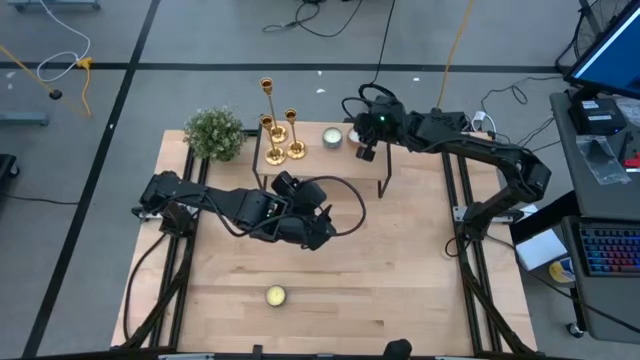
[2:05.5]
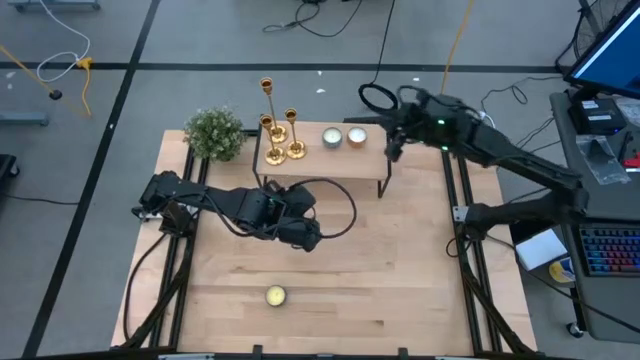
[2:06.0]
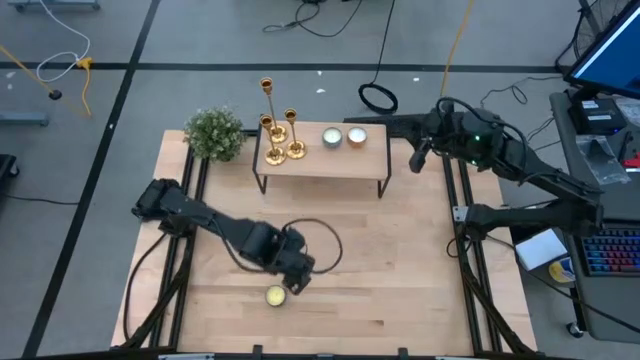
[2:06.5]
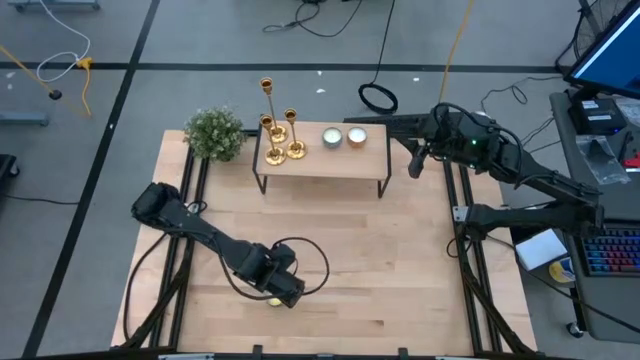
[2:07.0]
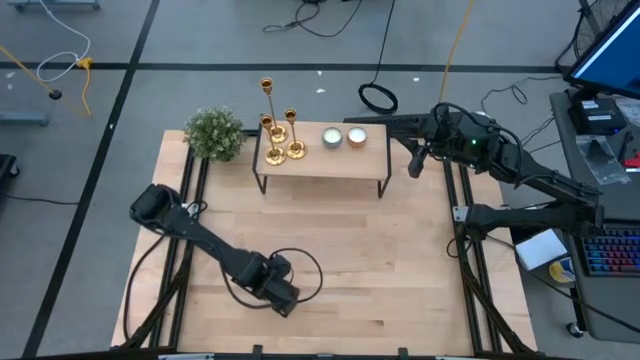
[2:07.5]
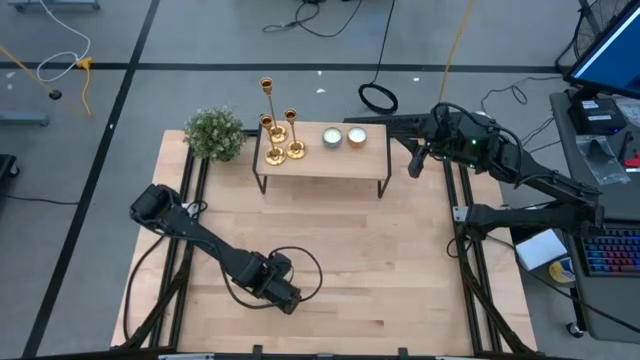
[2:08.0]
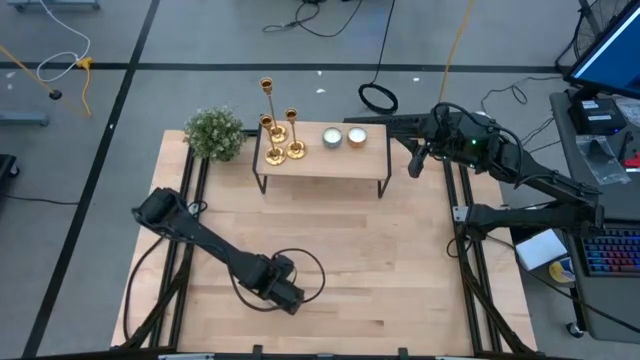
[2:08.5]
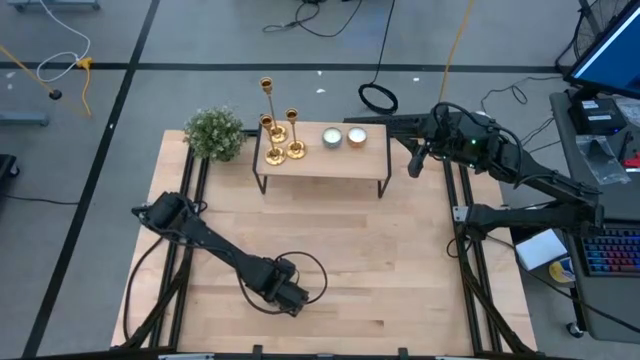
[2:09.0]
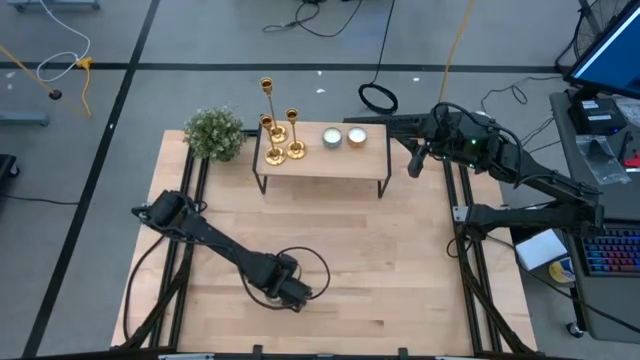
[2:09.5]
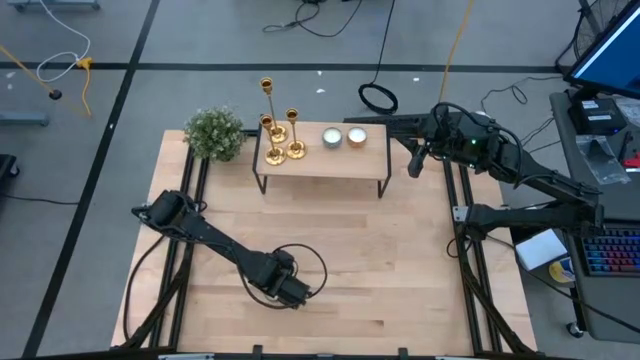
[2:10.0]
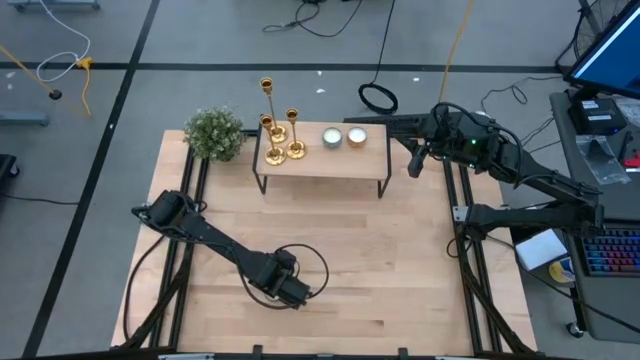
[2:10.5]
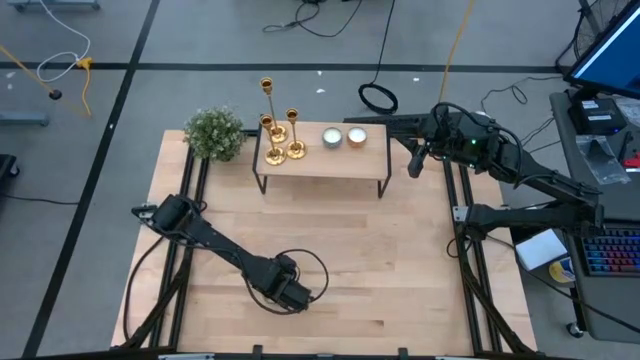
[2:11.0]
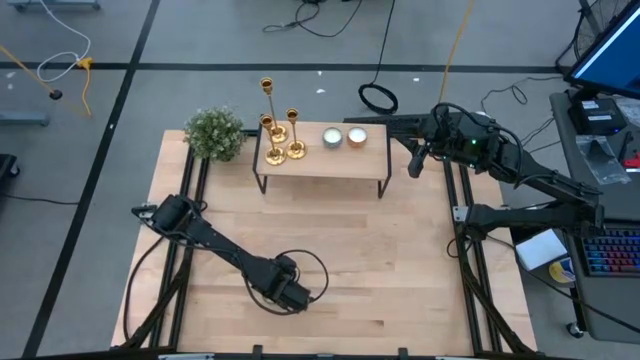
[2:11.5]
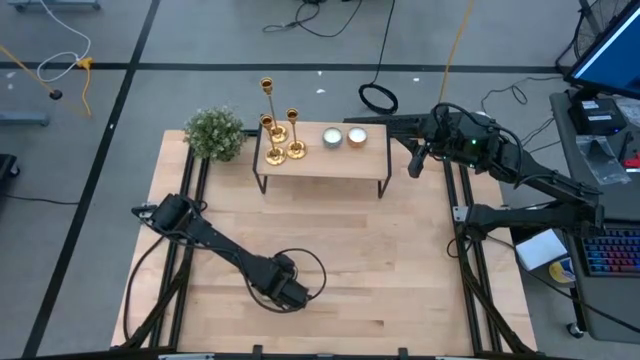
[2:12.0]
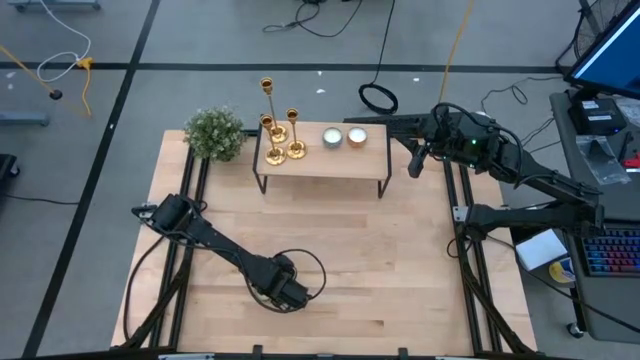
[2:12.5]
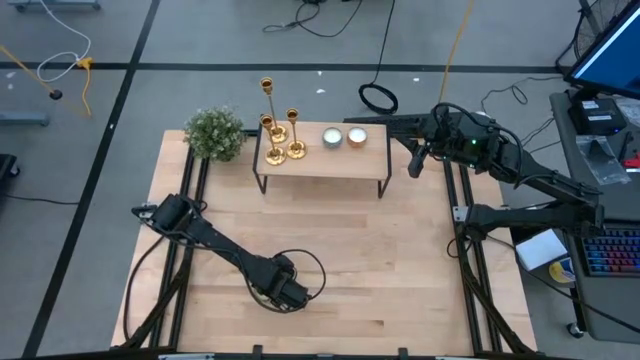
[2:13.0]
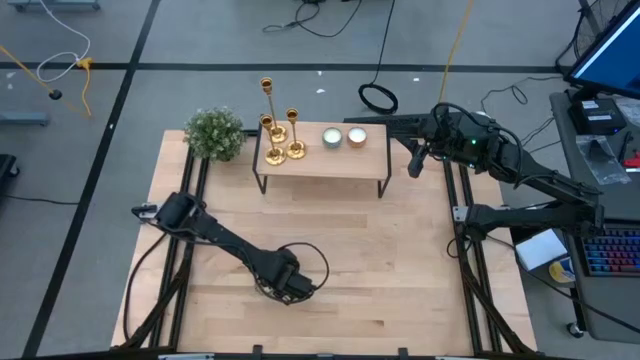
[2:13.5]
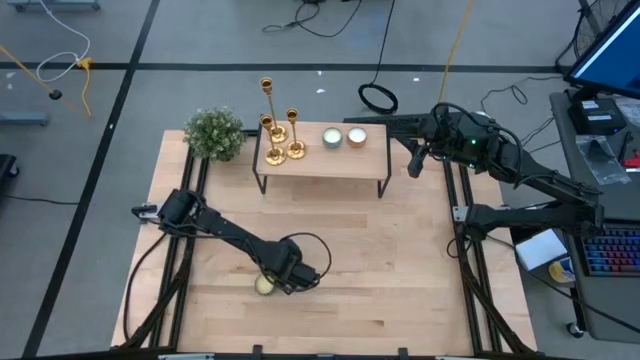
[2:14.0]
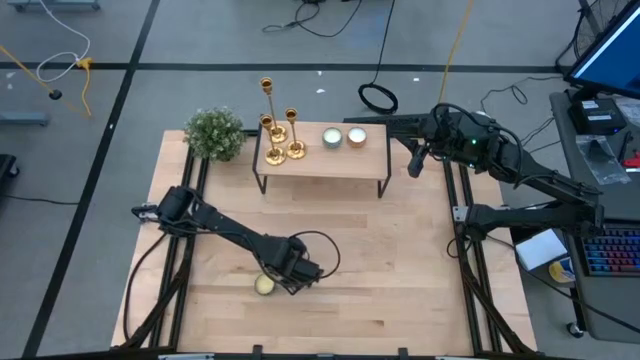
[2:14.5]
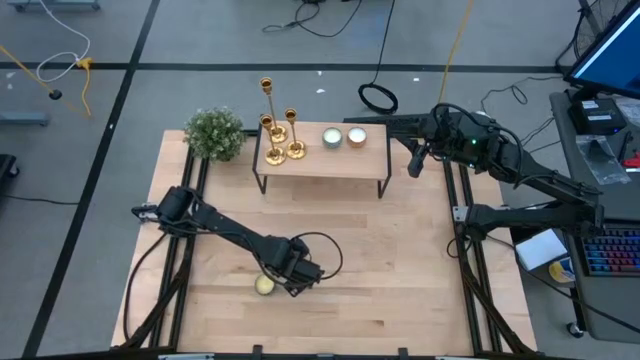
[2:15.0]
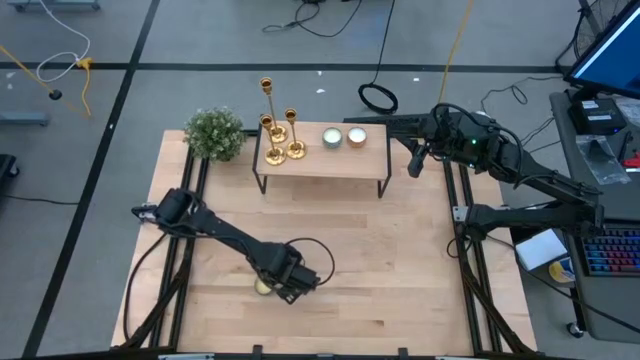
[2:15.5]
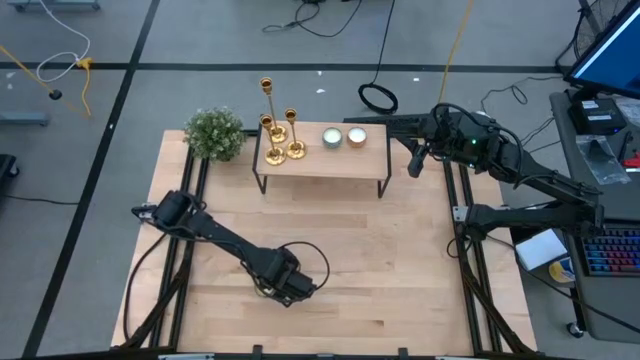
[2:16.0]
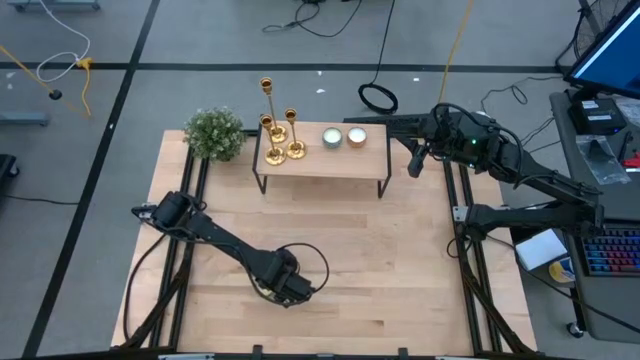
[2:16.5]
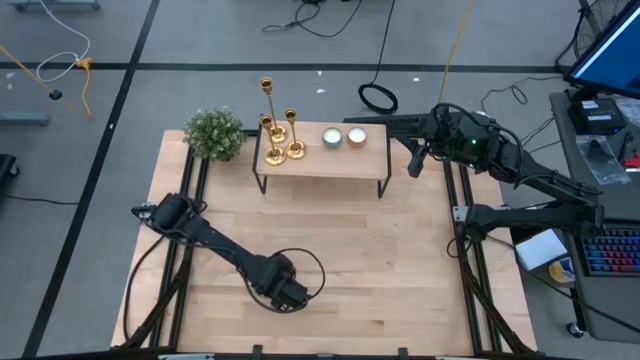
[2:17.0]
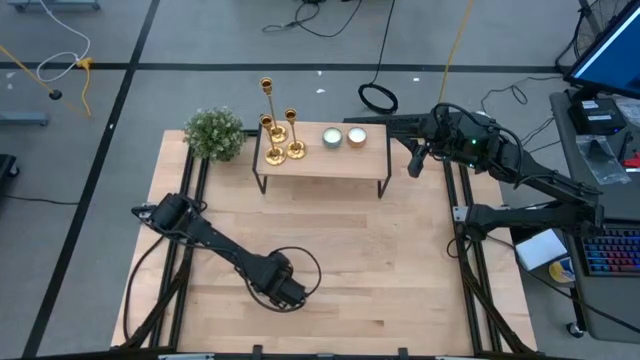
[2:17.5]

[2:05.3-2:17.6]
Task: Pick & Place candle stick holders
Put the red and black scented candle on the shelf

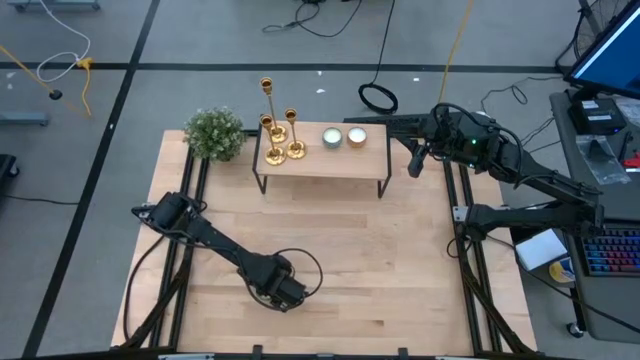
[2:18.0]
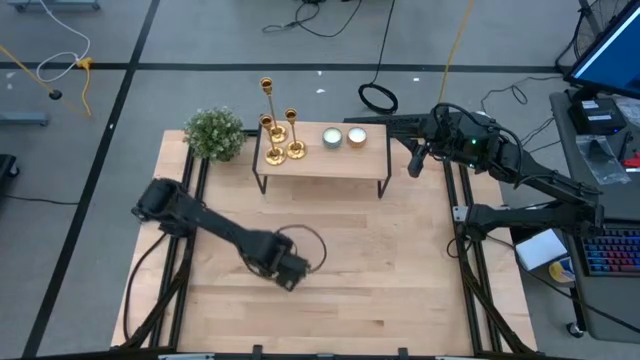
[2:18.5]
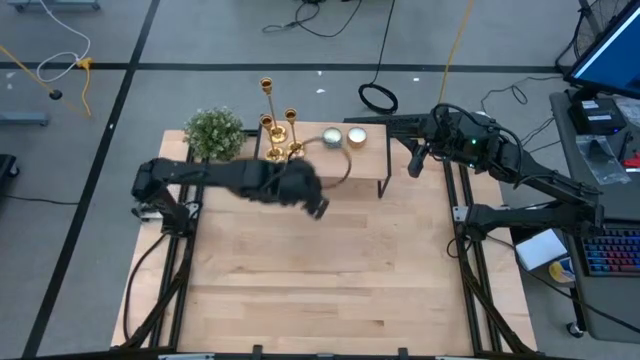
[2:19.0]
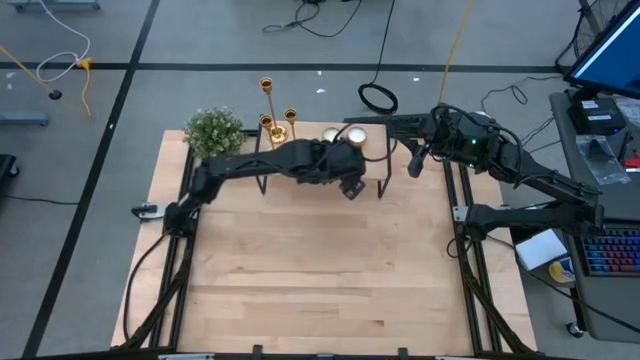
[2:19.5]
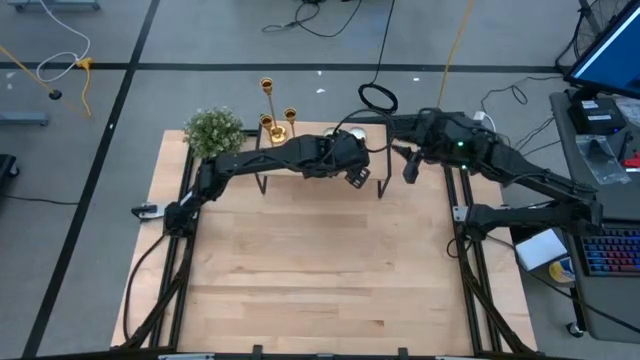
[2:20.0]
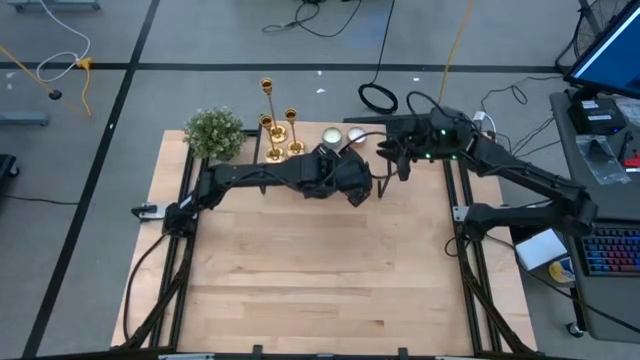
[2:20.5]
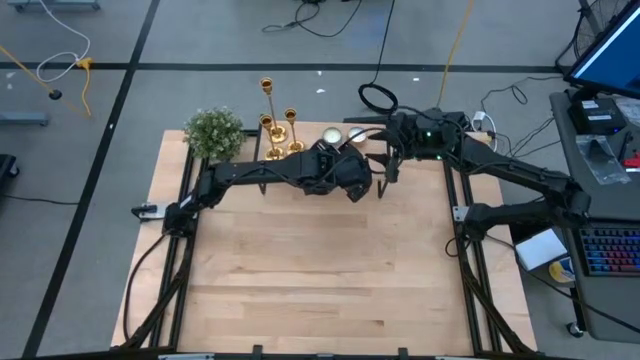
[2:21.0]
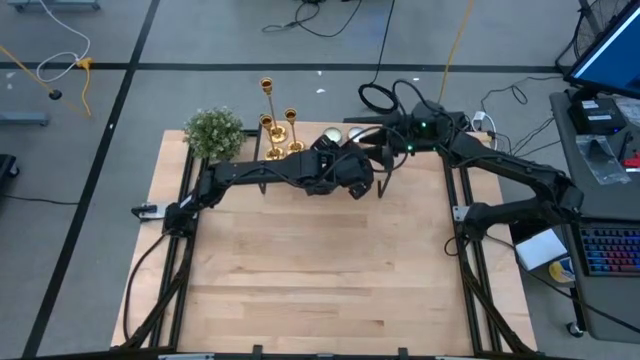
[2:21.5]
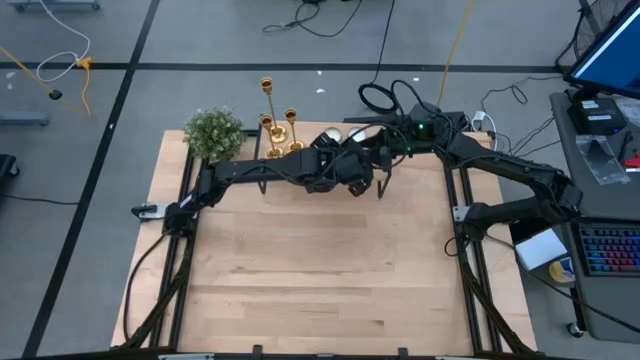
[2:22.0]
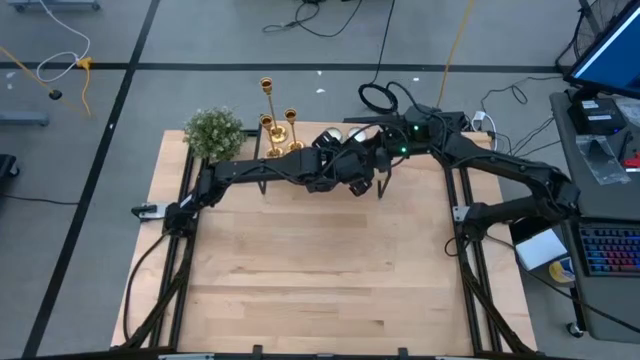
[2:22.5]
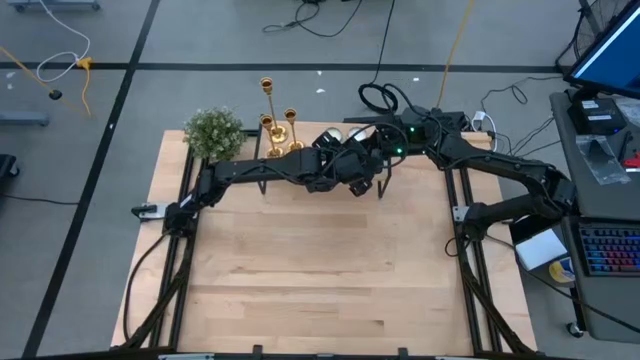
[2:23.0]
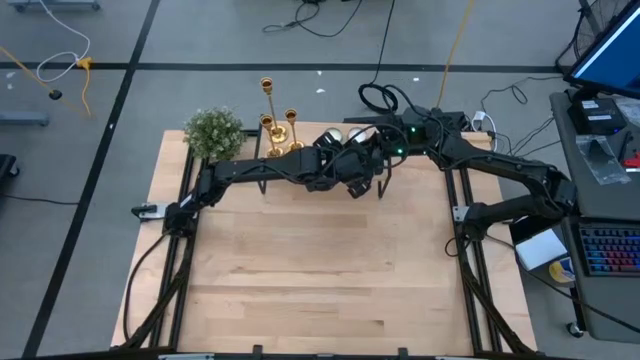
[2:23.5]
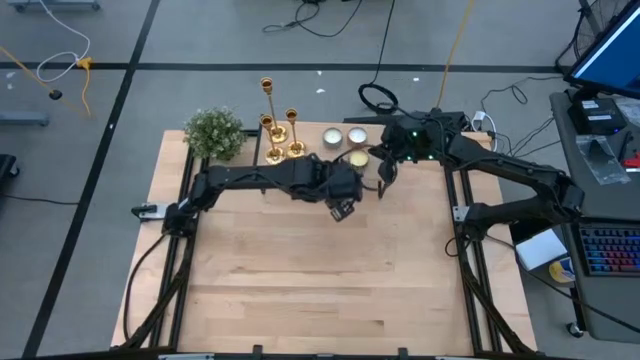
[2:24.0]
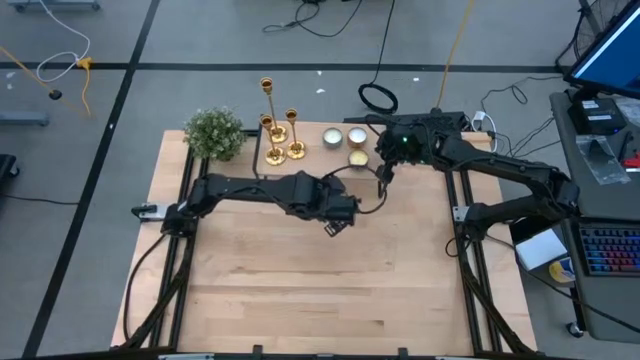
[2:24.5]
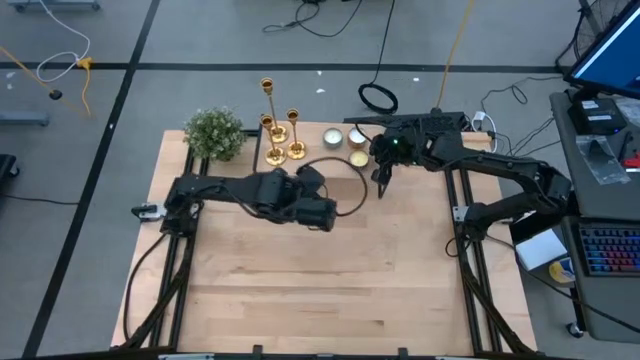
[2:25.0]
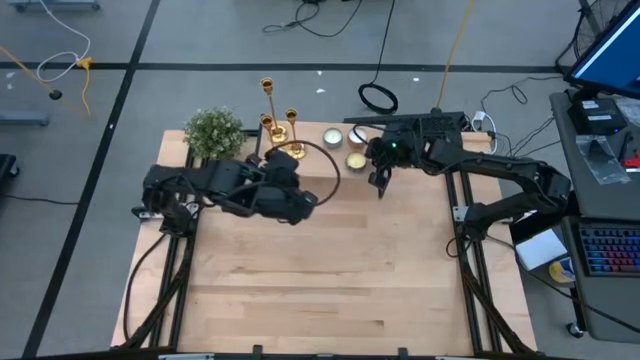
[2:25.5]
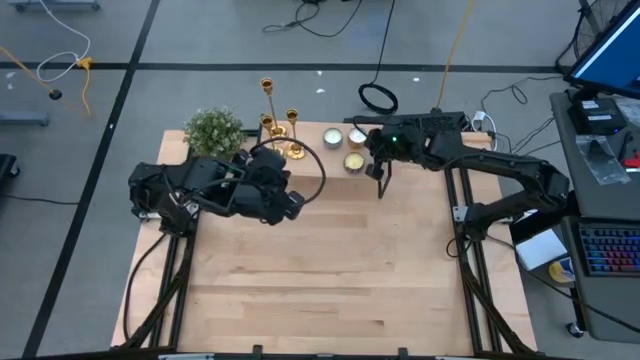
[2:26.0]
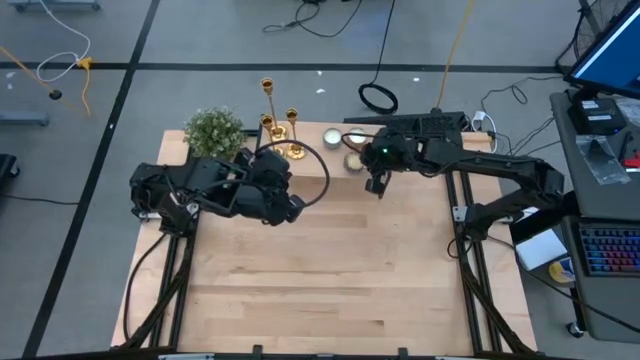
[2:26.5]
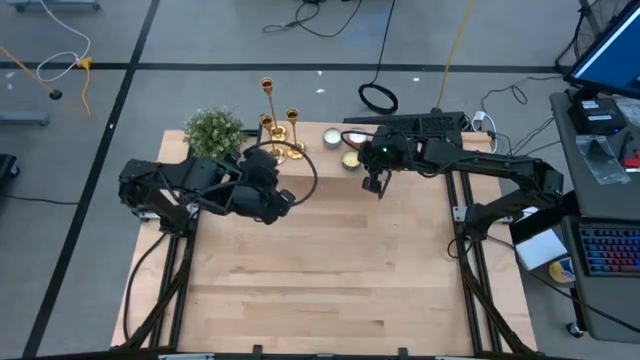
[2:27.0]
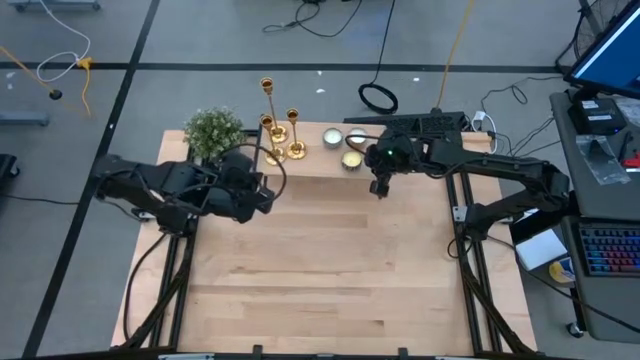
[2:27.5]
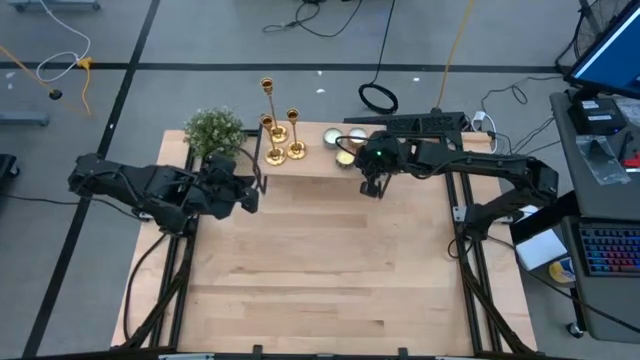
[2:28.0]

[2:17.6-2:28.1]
Put the red and black scented candle on the shelf
